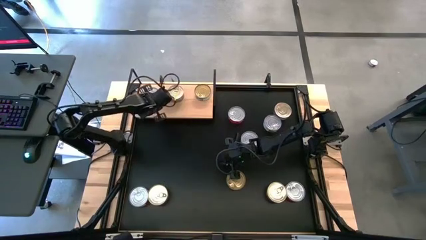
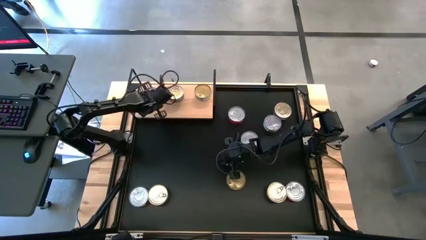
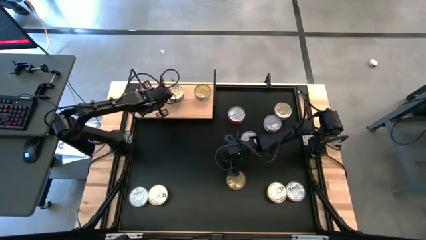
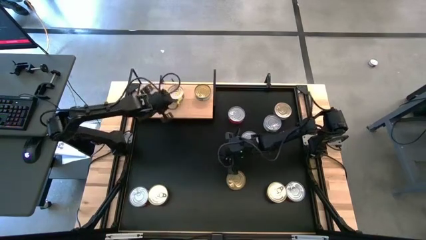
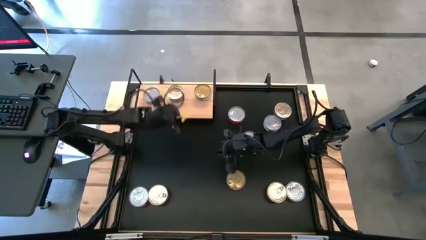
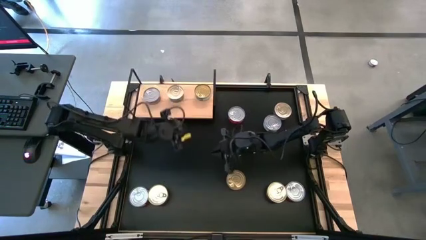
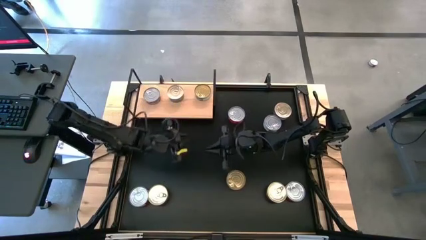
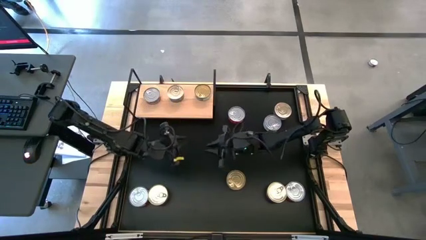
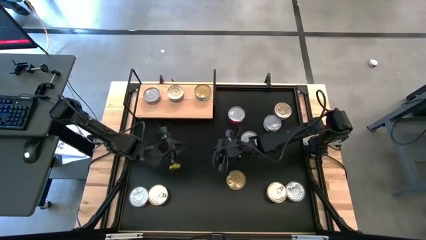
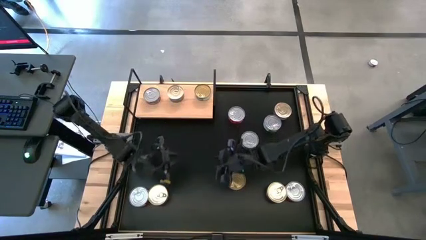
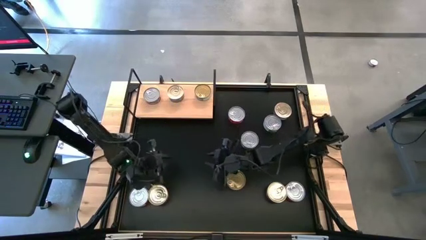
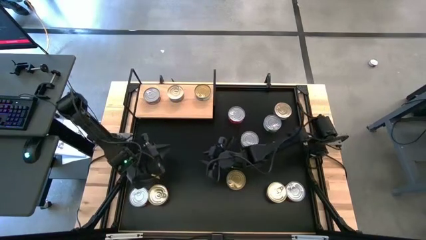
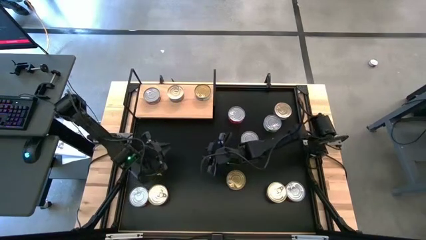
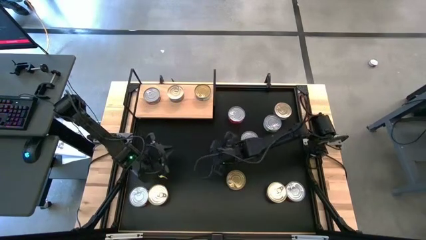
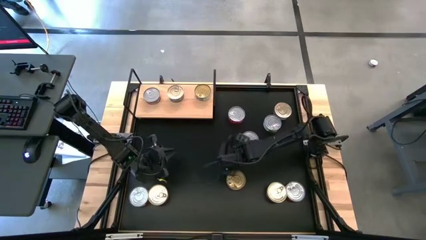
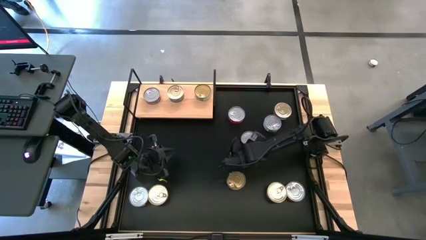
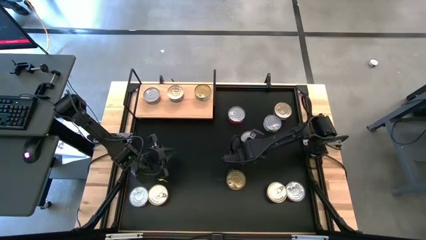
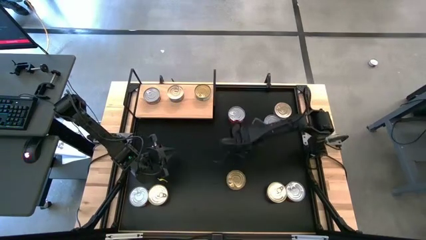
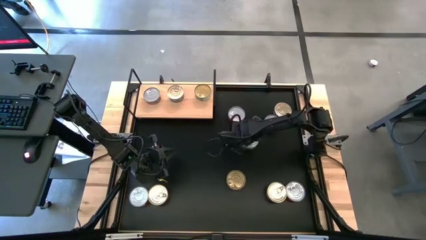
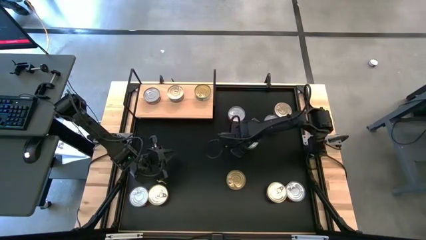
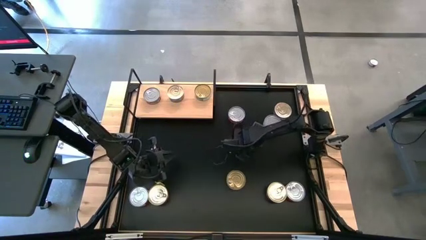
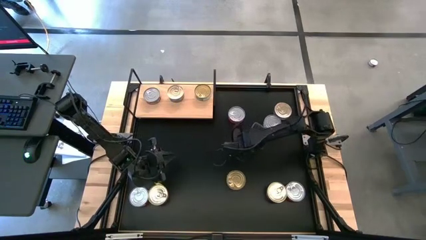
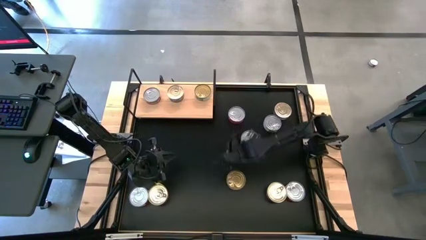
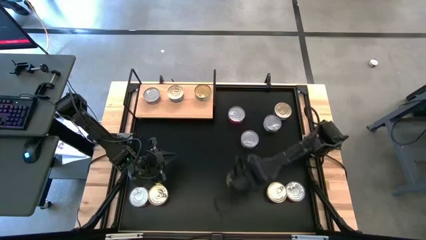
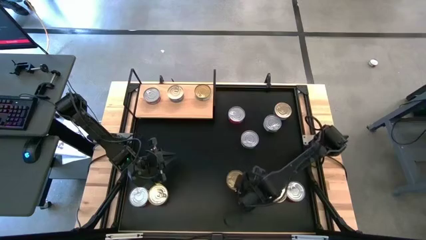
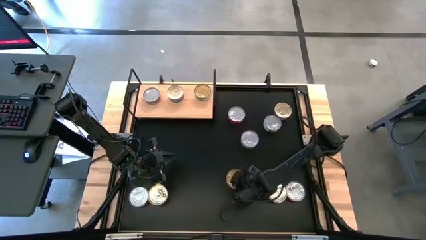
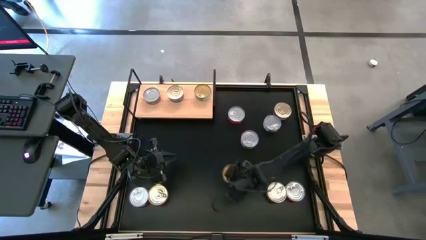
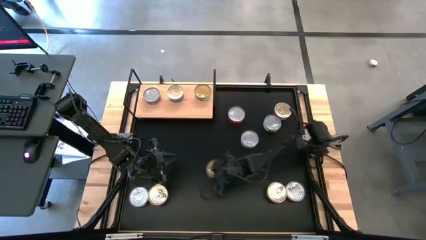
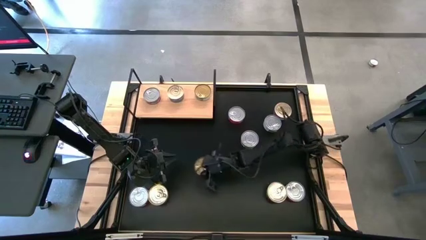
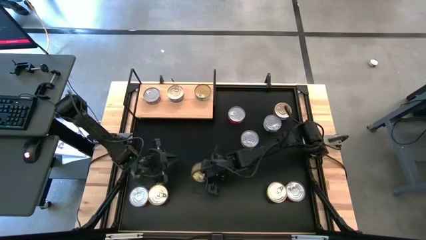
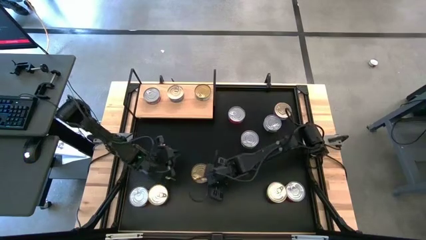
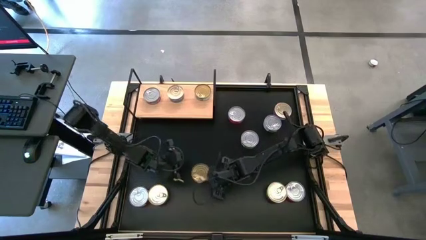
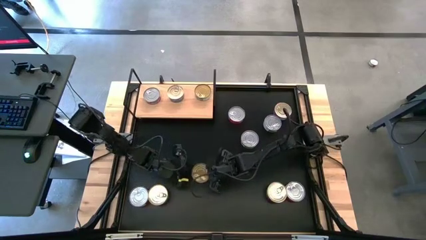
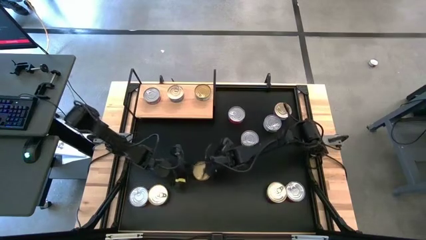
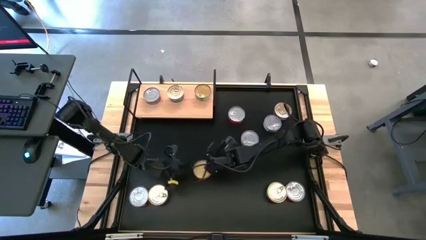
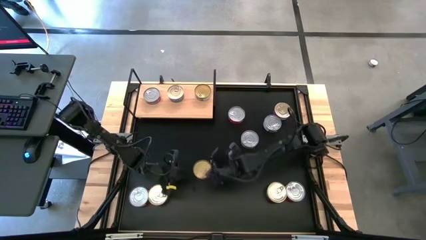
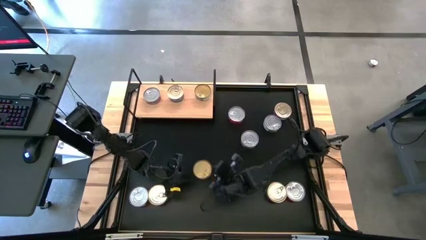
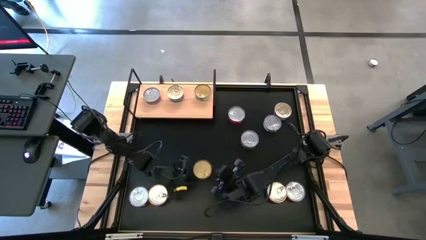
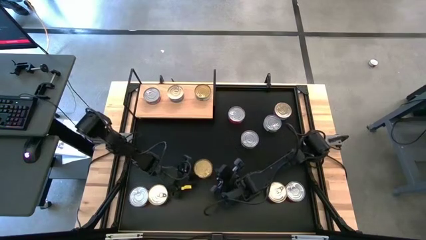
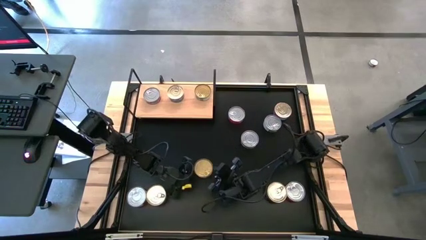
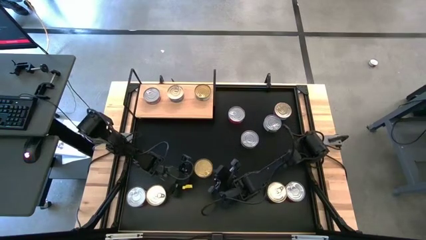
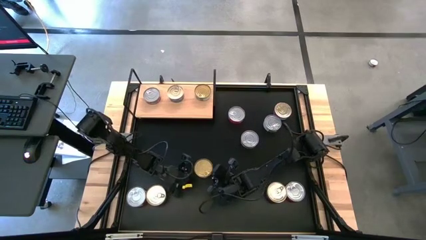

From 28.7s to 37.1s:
Task: Stack canned seafood by type on shelf
Put the green tuna can on the shelf aligned with the other green tuna can

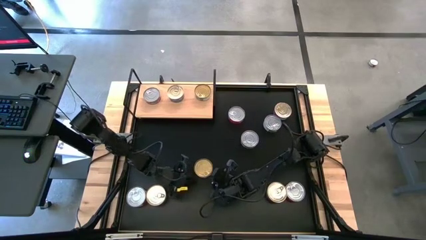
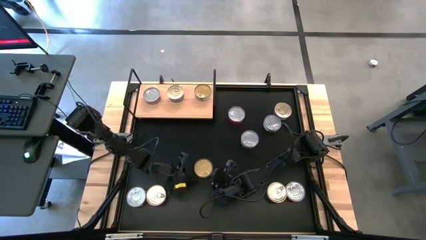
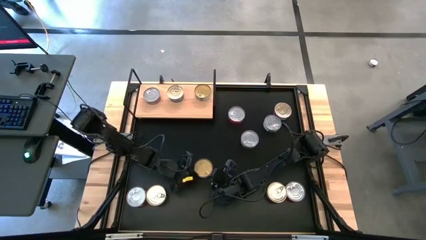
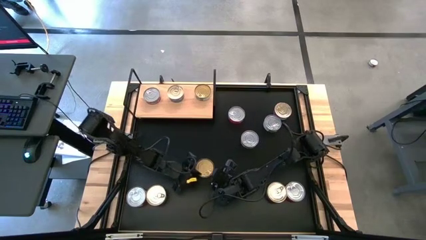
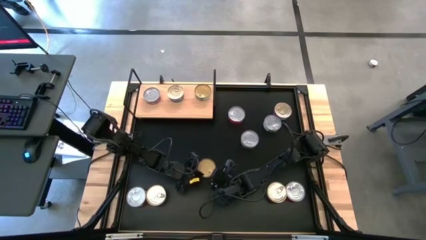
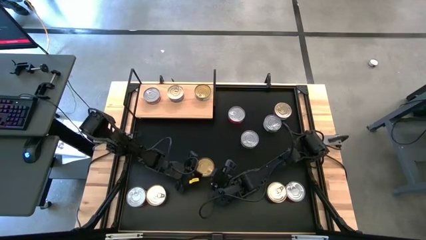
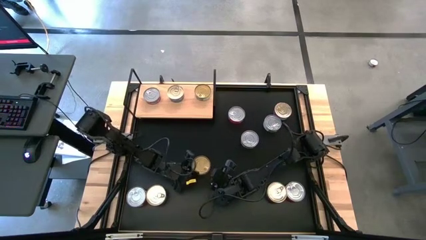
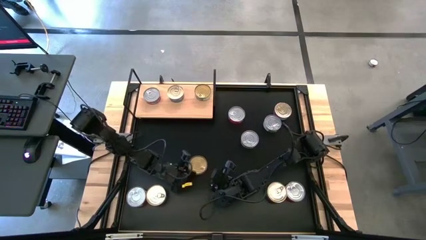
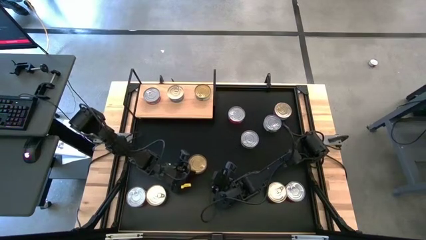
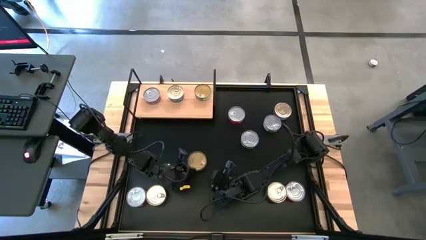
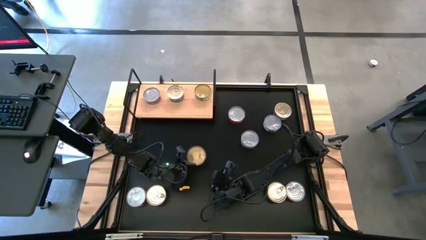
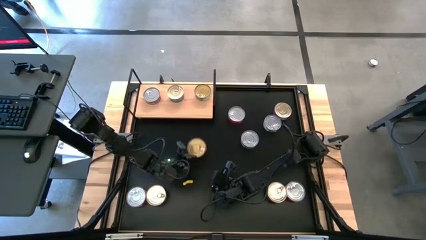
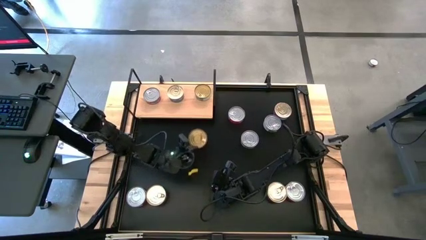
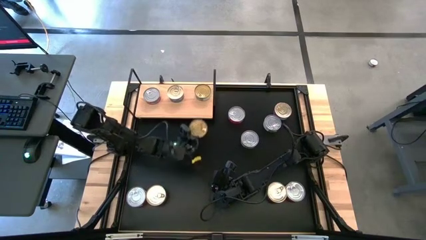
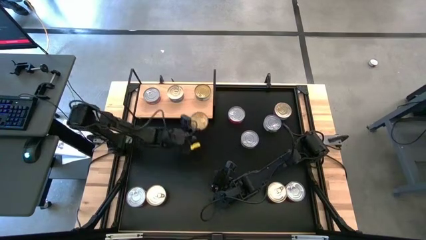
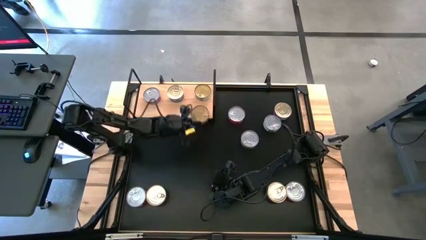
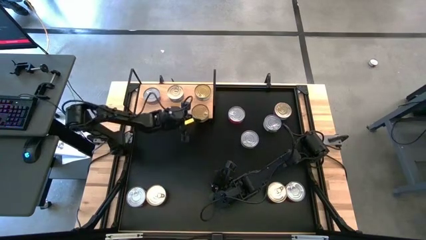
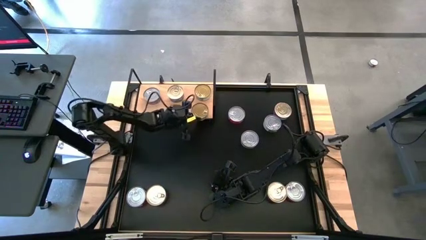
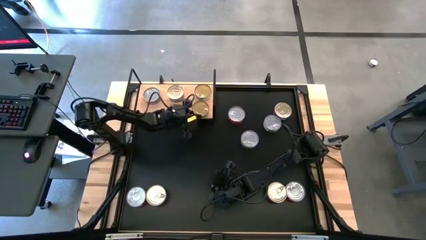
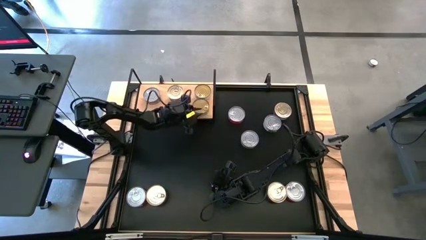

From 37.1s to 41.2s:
Put the green tuna can on the shelf aligned with the other green tuna can

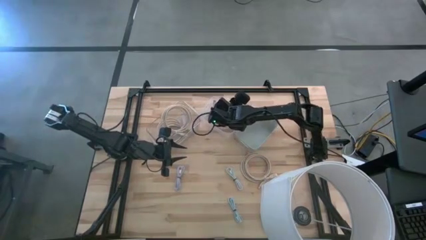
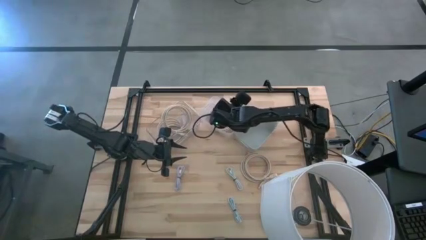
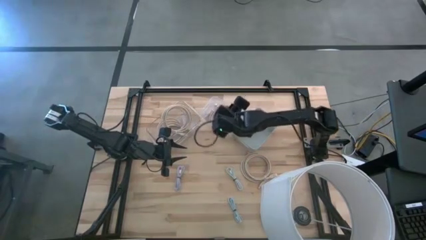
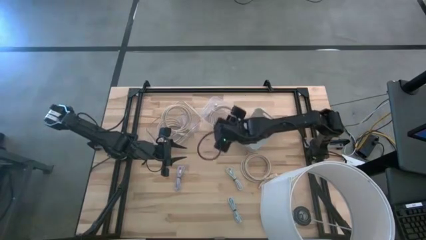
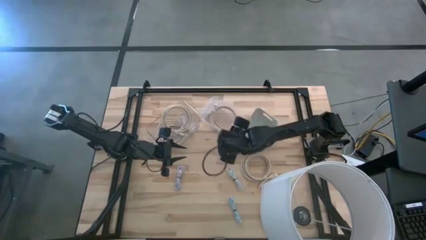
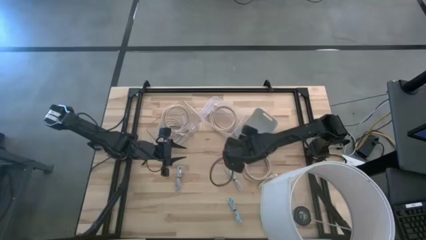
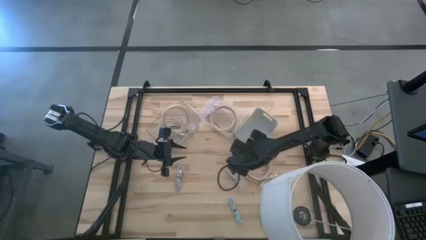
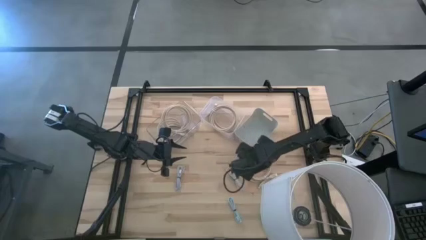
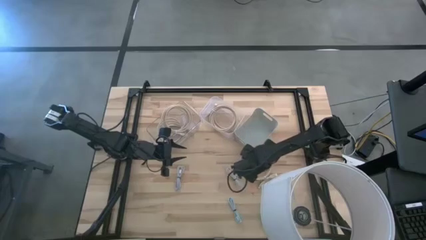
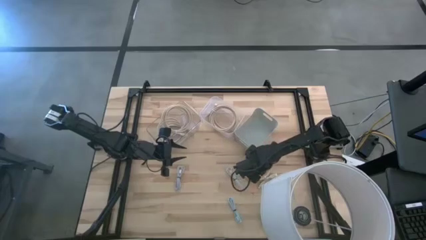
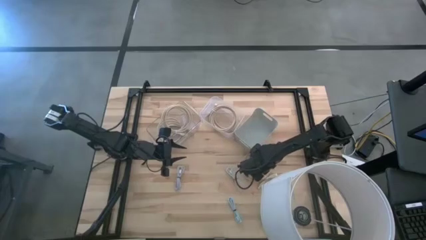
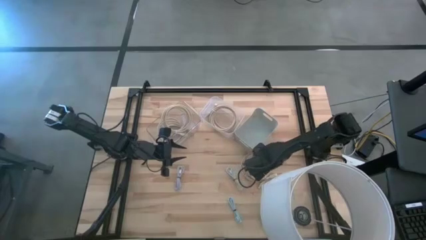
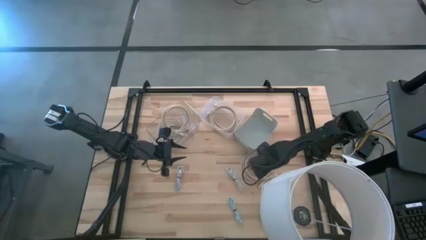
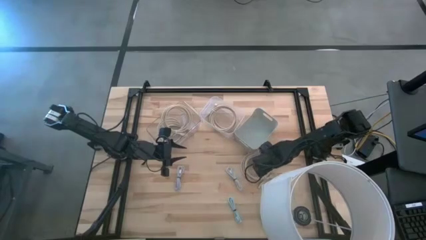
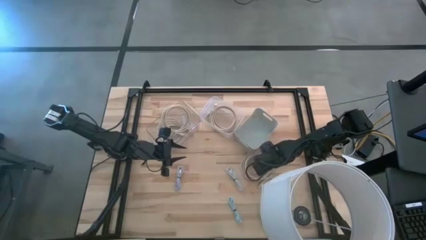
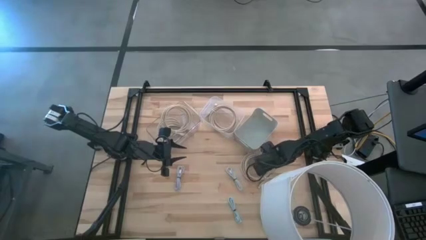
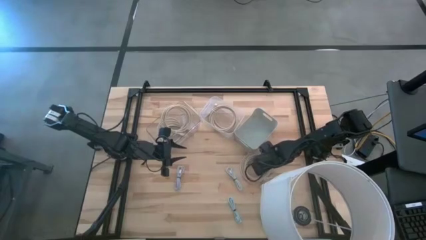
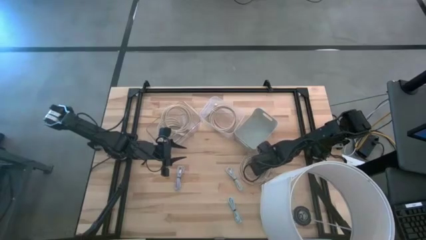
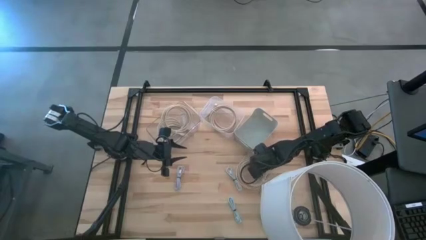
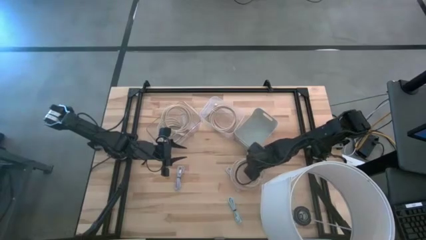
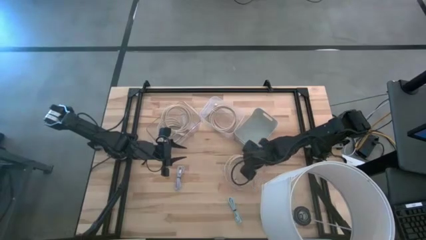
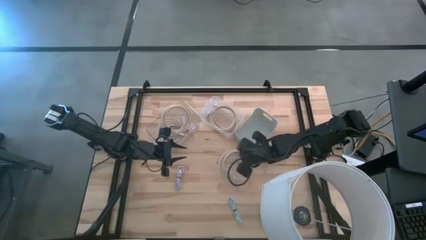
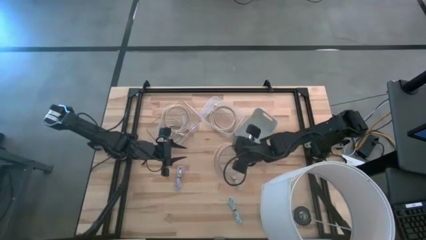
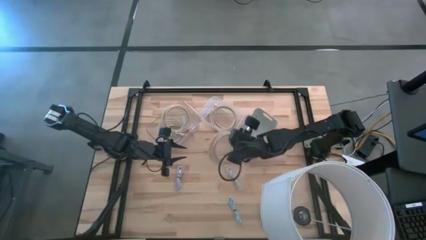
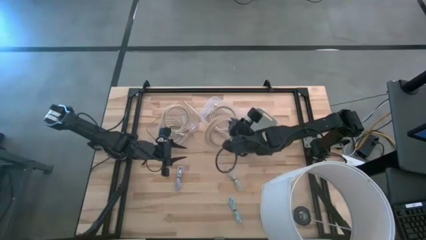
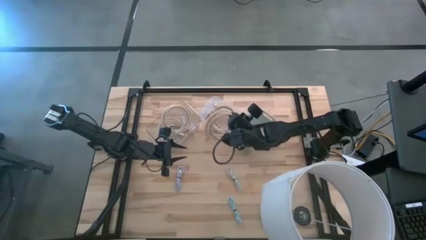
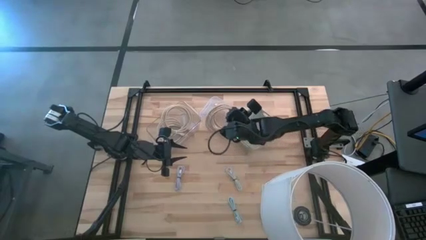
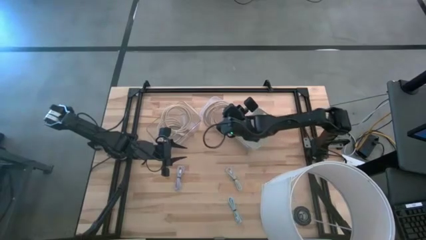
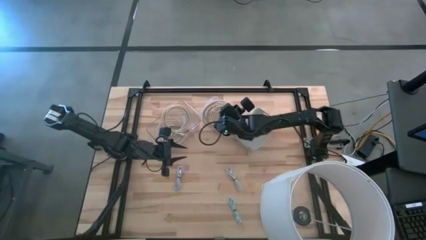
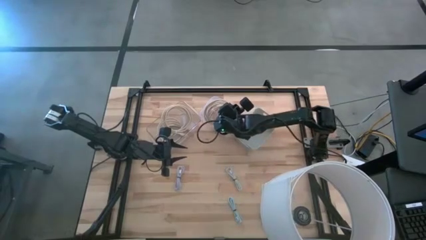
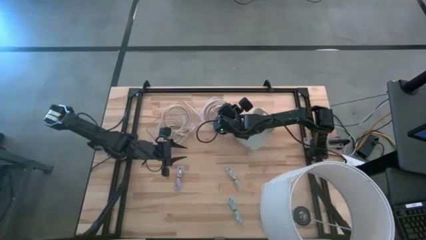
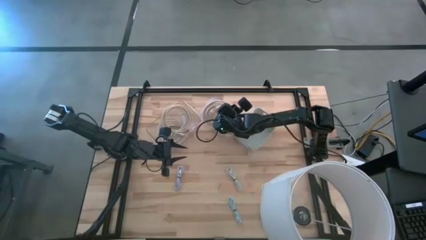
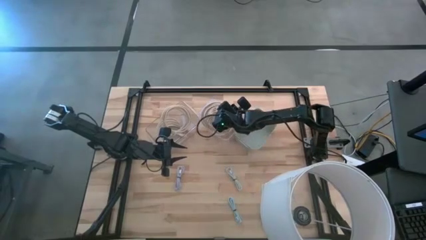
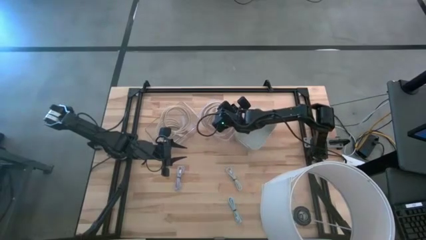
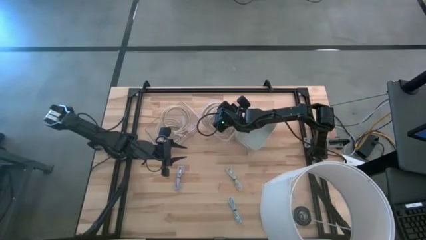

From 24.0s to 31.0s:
Task: Pick & Place USB Port
Put the light brown HDMI cable into the right transparent bin
